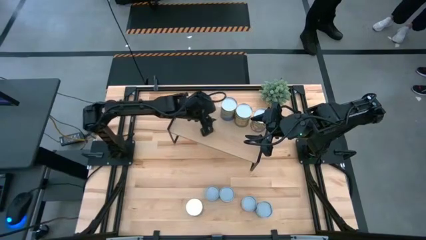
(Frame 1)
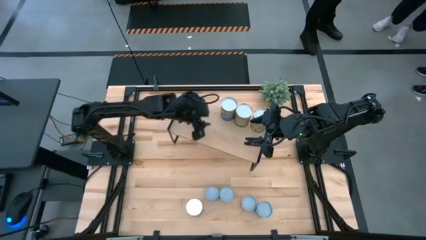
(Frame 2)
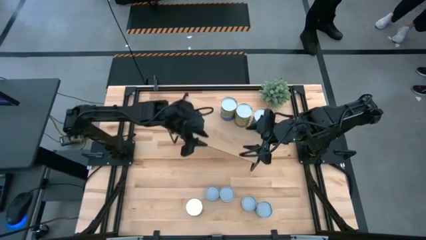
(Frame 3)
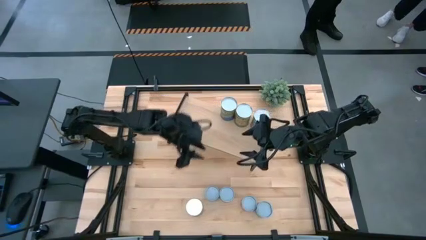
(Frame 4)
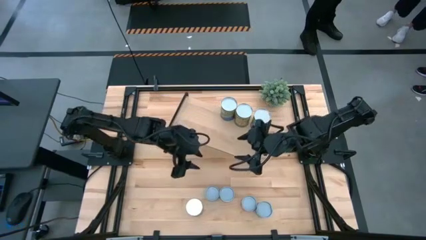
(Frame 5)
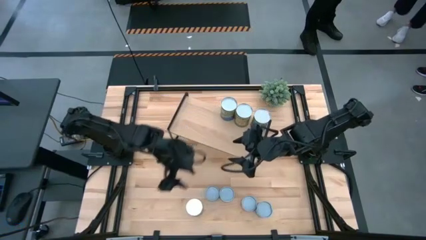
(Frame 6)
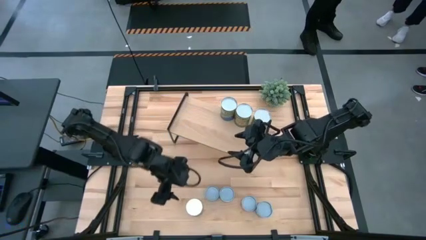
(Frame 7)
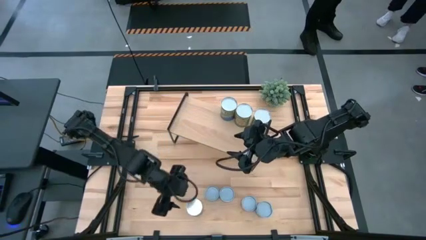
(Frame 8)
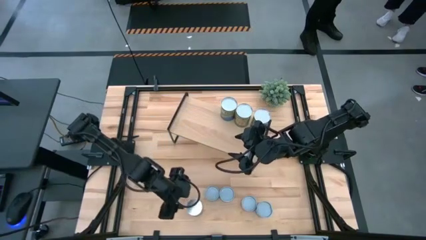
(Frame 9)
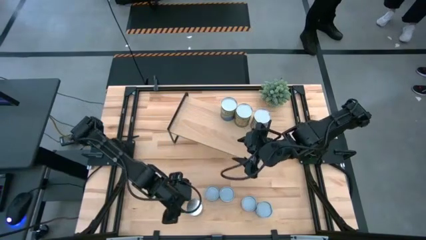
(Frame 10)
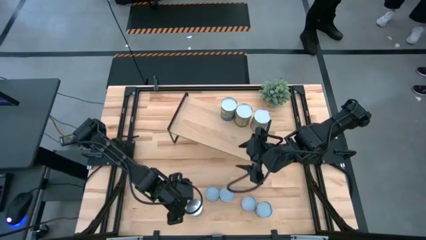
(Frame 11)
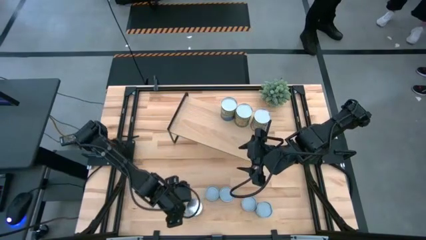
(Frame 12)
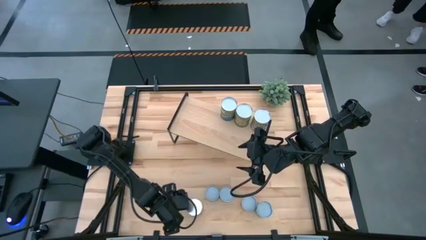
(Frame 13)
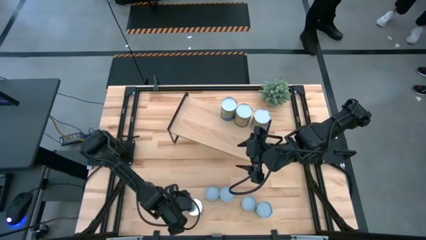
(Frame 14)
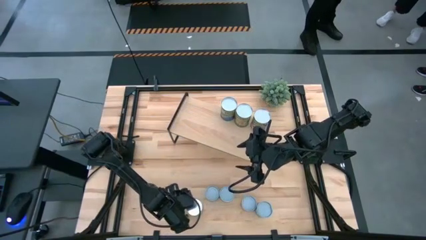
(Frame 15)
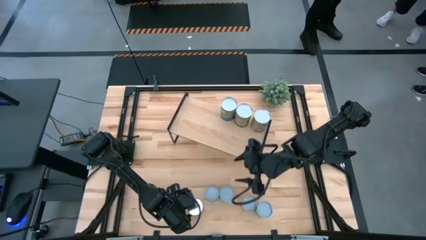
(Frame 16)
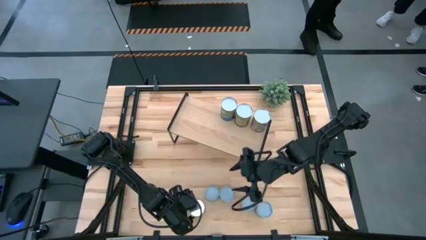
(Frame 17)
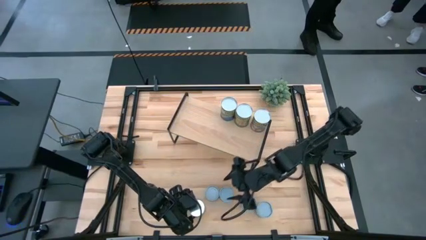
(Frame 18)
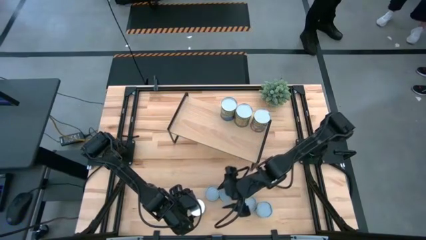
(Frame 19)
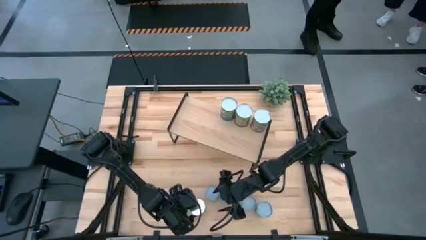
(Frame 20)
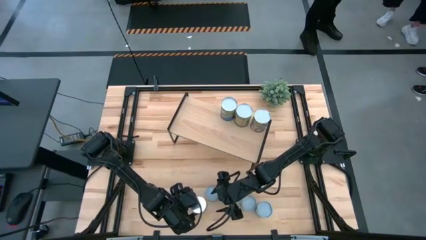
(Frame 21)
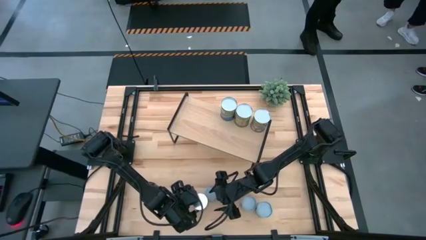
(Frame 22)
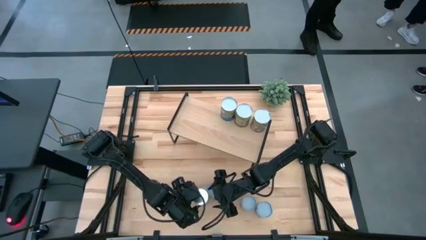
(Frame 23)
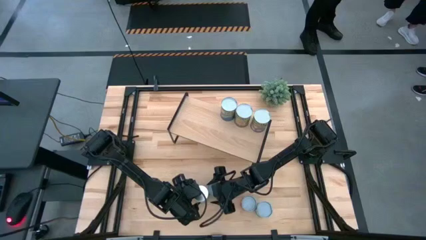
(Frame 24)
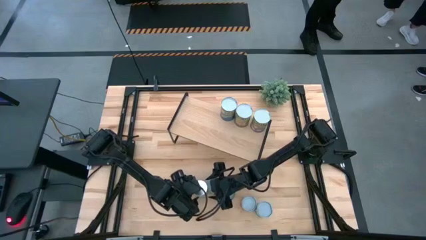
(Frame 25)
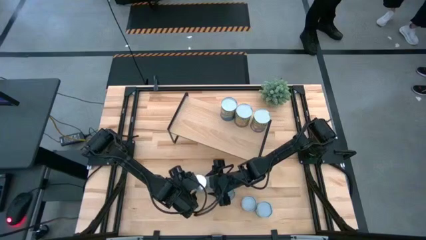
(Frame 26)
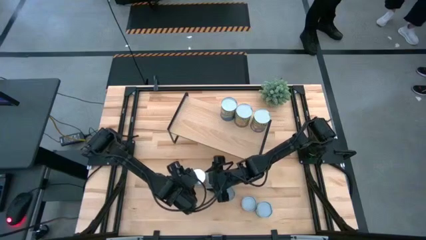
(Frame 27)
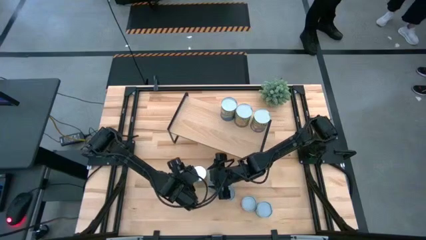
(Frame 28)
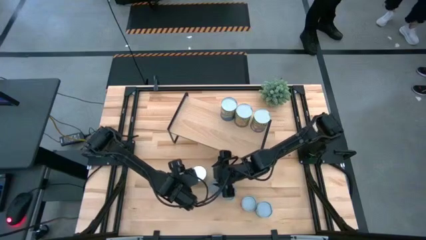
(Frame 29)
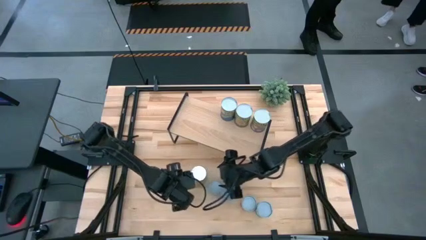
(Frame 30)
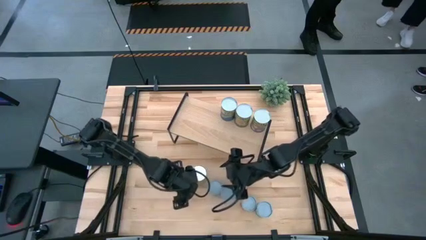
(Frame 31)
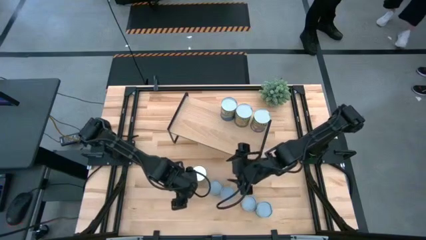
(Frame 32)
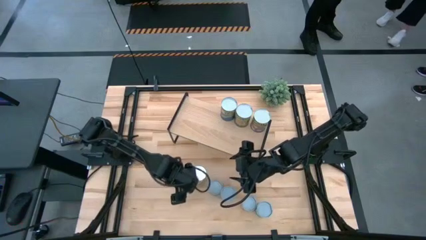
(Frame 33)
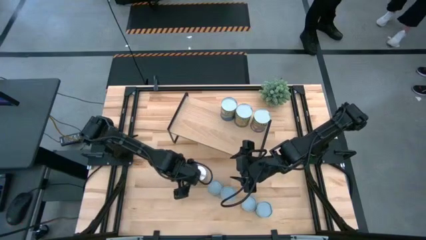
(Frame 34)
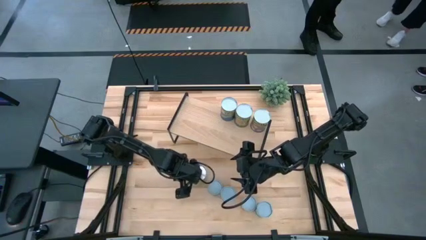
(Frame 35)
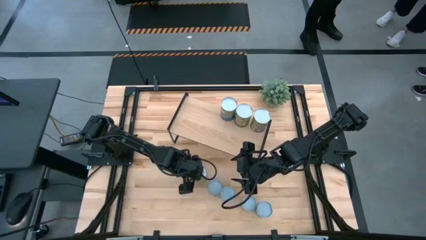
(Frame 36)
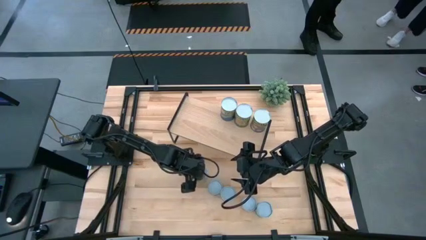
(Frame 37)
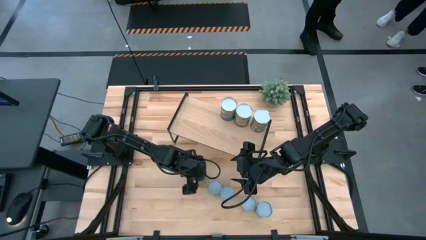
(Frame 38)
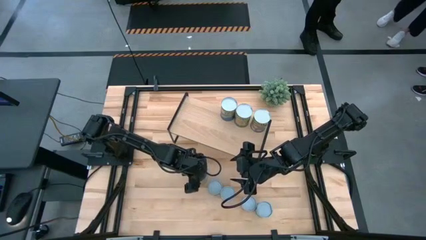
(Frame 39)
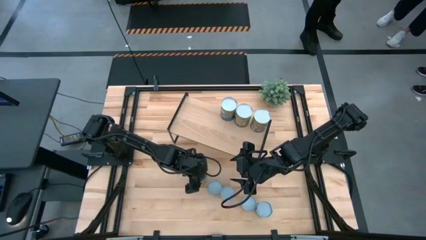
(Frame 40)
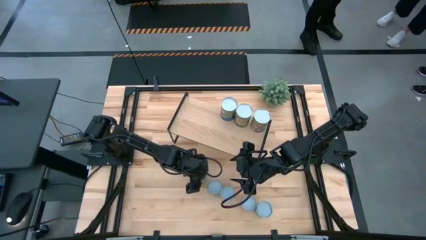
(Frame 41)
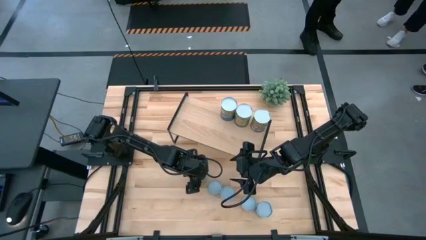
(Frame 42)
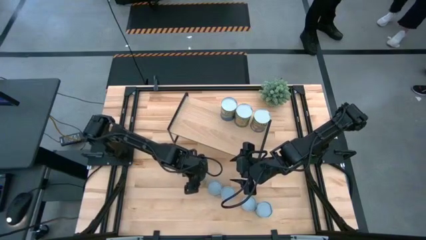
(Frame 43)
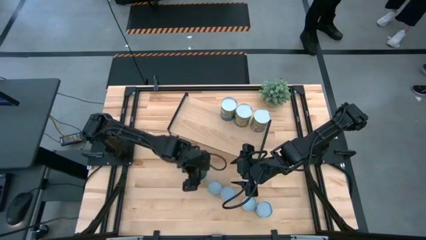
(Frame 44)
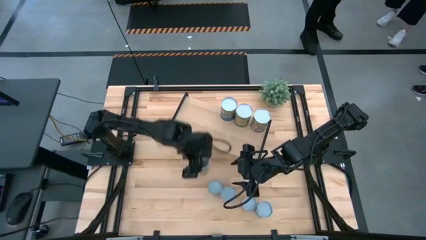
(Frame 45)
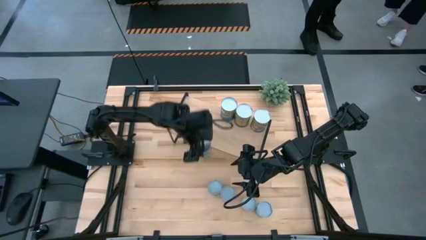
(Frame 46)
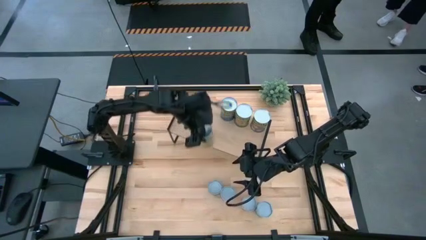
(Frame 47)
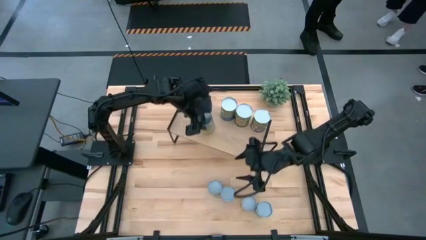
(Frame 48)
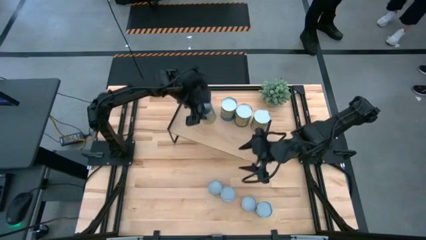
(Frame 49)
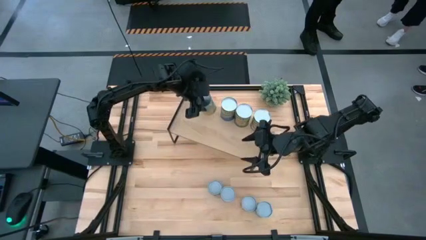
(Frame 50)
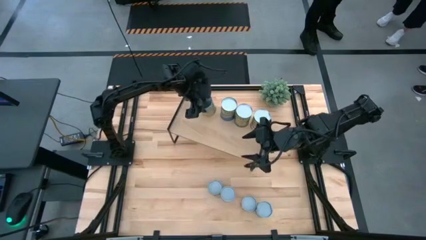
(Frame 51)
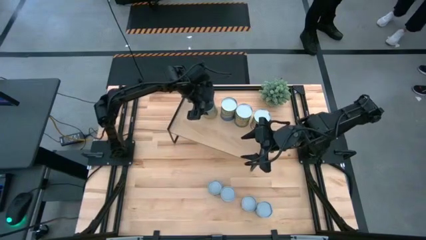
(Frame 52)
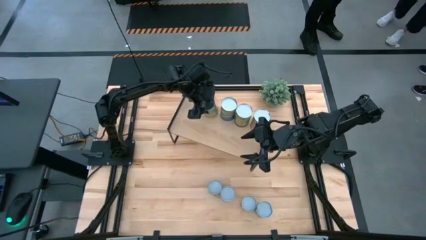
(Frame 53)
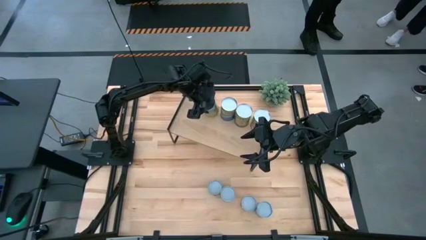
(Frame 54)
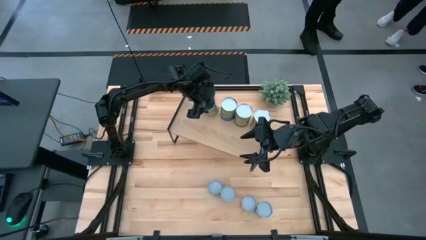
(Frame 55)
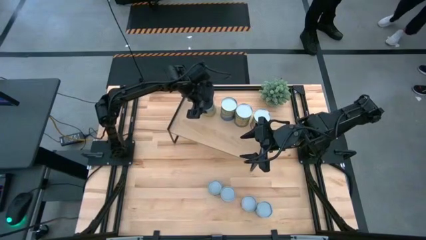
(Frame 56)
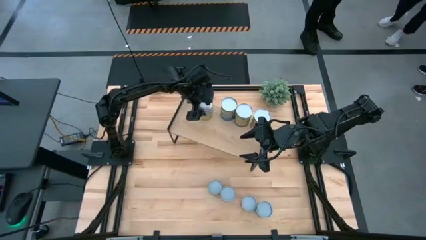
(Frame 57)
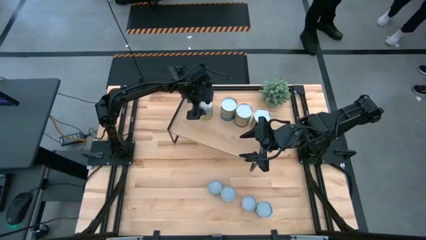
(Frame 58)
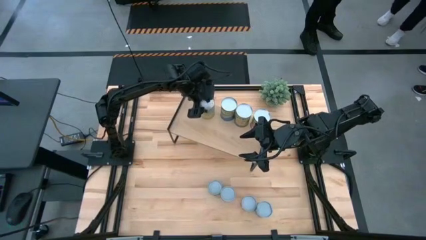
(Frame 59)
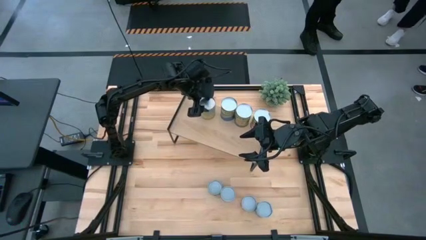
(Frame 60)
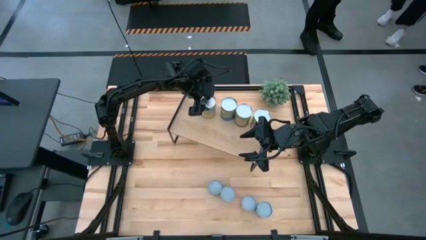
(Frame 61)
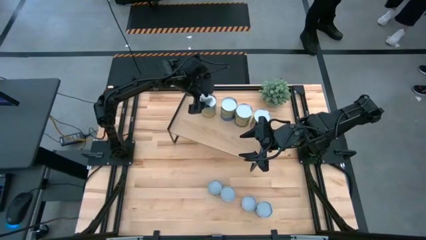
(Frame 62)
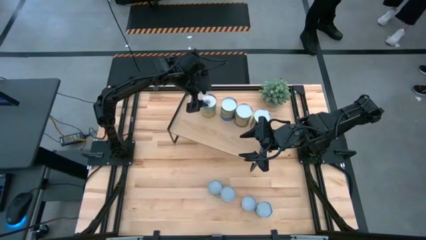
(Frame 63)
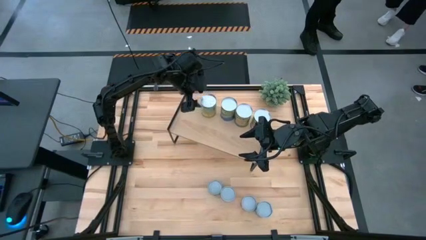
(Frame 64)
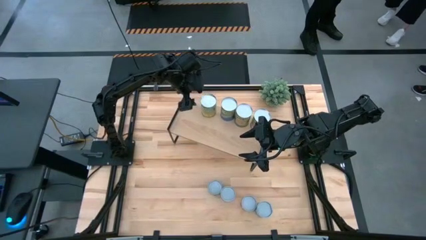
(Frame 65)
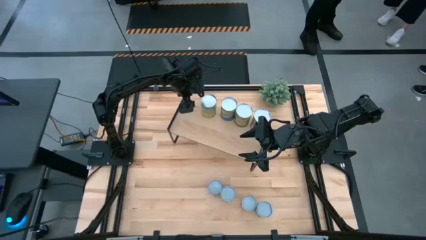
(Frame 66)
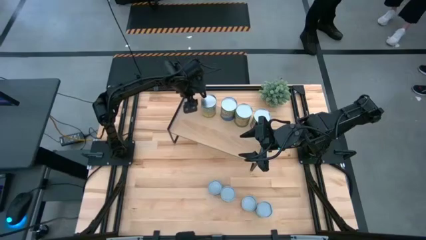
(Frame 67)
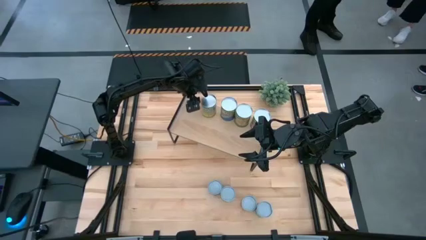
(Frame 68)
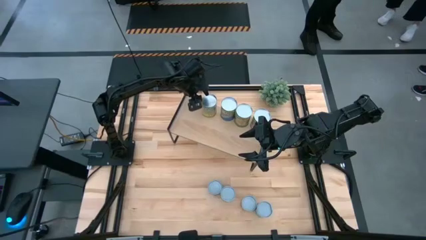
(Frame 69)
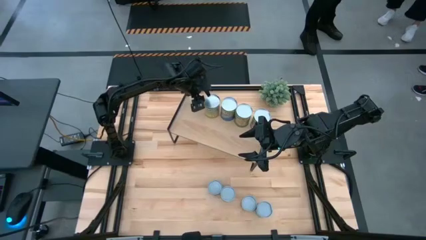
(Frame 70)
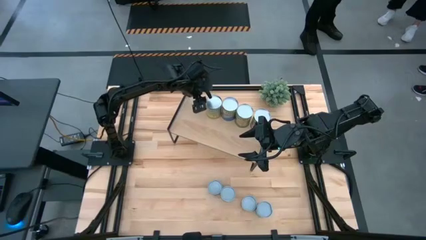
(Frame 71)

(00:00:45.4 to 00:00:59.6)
Task: Pick and place cans onto a shelf
Put the canned carrots on the shelf

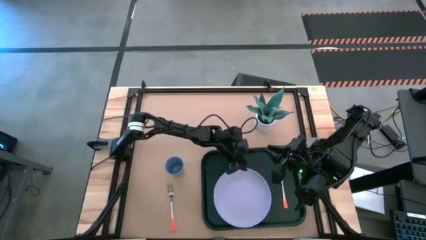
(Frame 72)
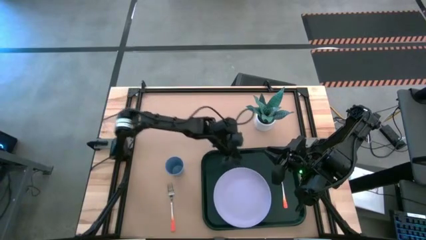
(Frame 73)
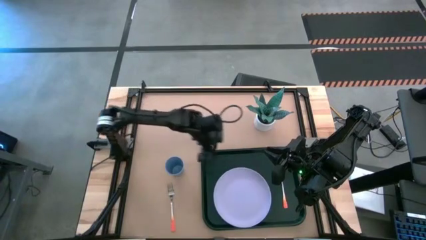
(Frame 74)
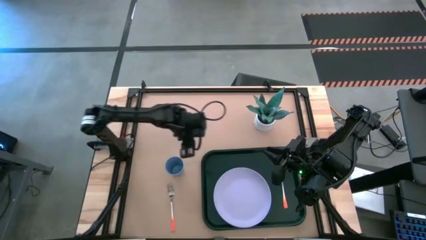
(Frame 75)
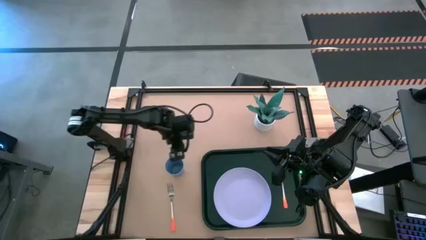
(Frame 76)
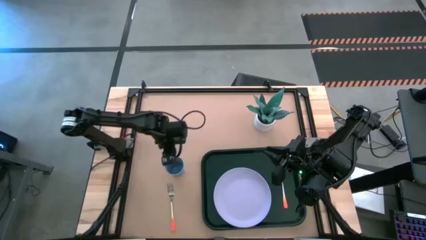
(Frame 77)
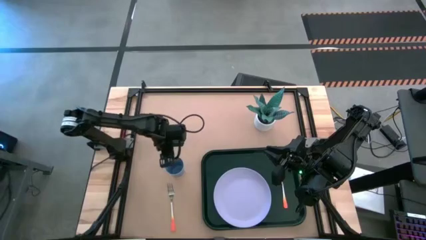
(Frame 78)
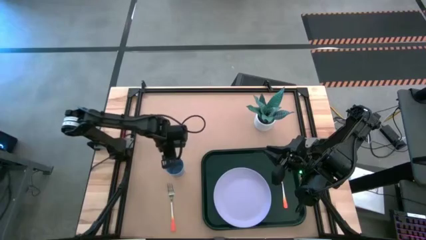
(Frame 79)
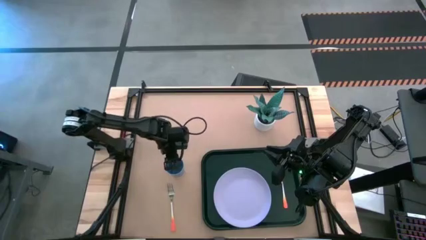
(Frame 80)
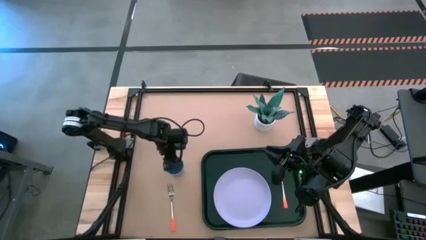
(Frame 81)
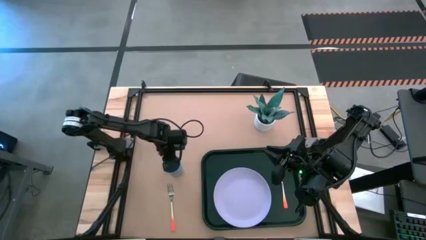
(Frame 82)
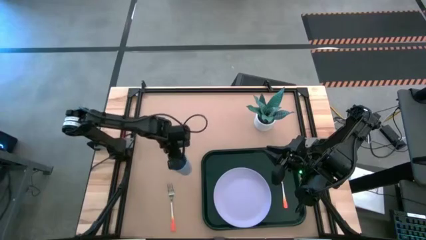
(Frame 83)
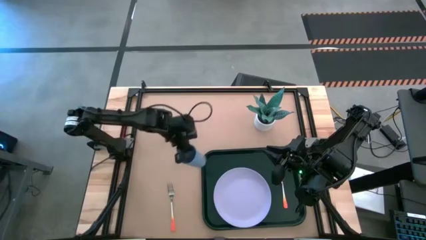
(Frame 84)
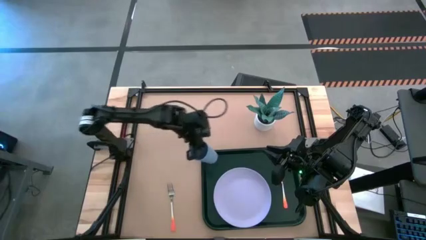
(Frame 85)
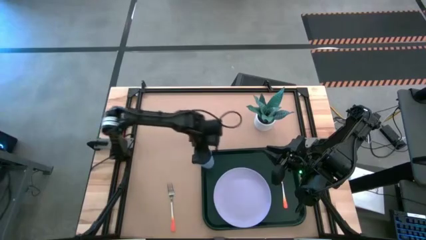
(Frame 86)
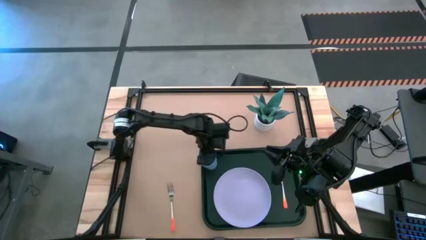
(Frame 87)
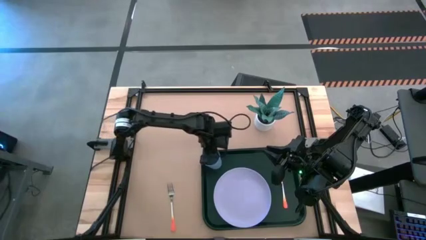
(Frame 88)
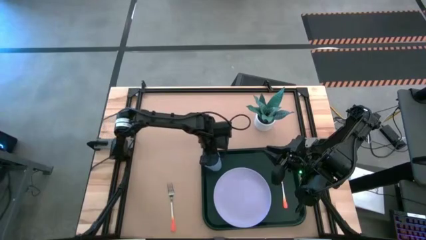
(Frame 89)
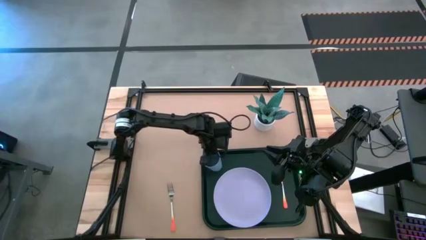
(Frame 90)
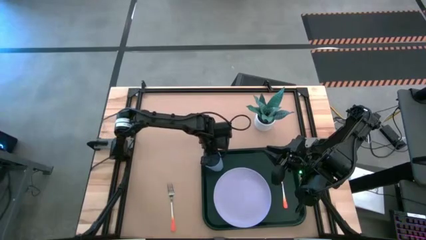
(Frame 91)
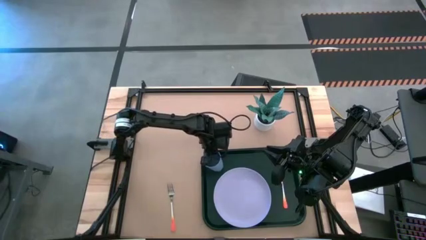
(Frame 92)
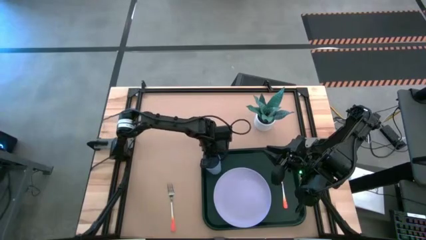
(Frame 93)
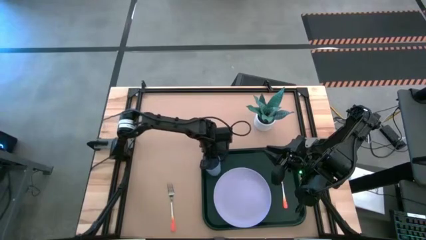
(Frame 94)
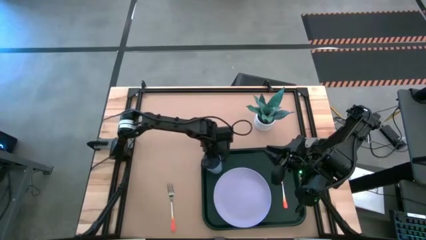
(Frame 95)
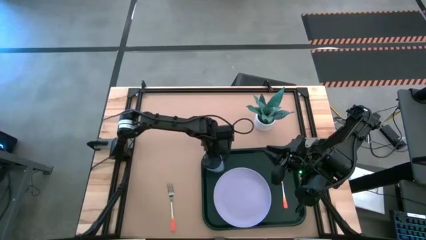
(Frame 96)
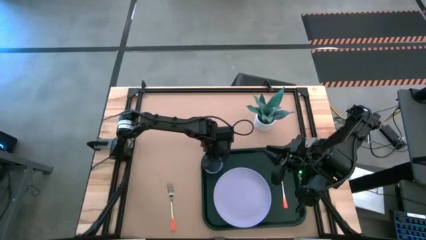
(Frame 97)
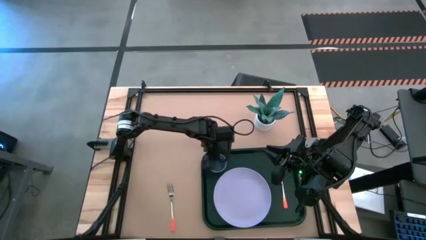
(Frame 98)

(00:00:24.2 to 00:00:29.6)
Task: Pick and place plate/cup/fork/spoon on tray
Put the blue cup on the dark green serving tray to the top left of the purple plate
